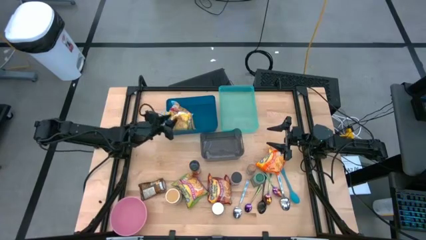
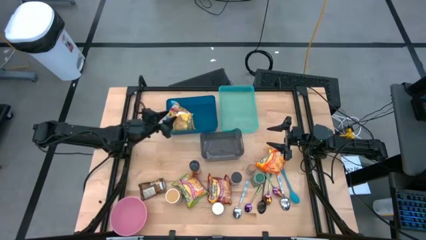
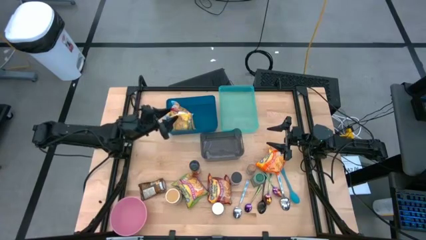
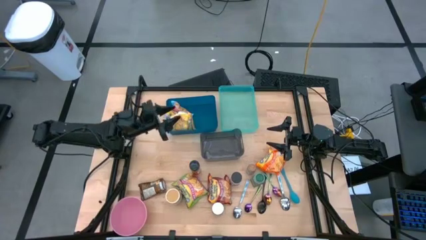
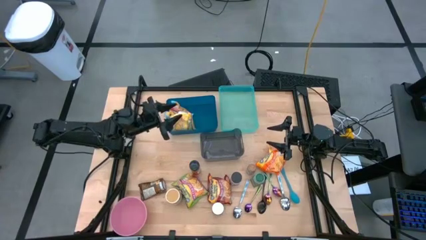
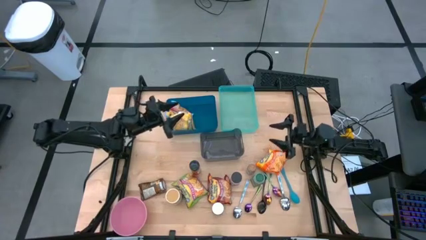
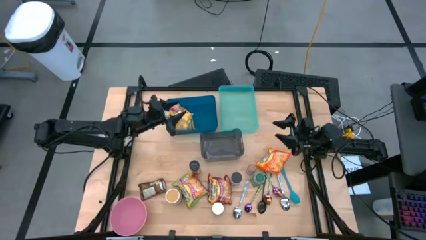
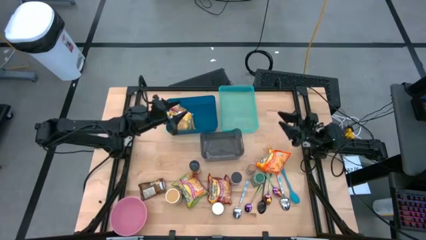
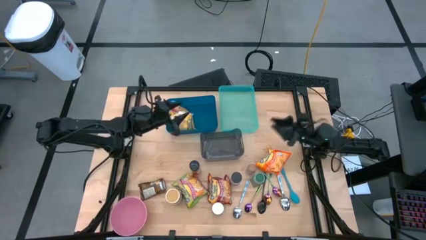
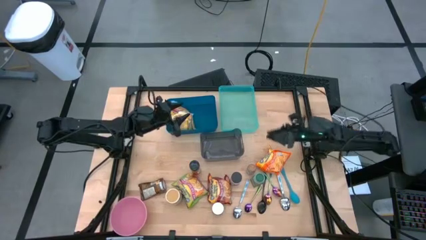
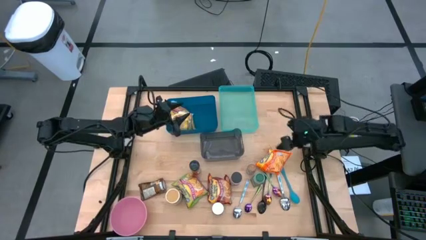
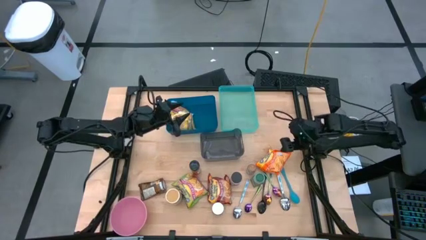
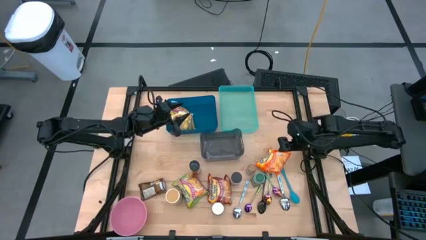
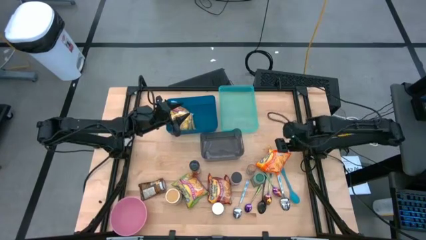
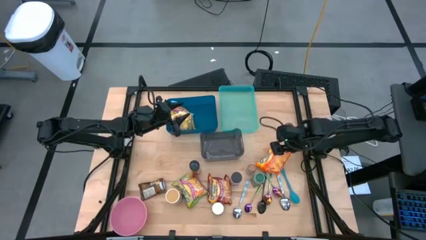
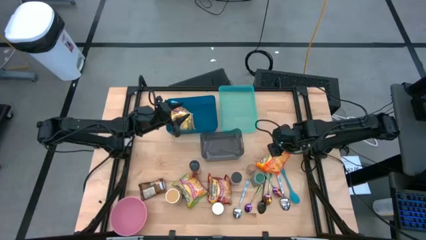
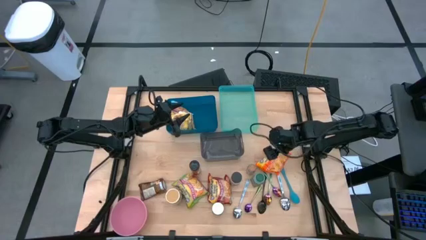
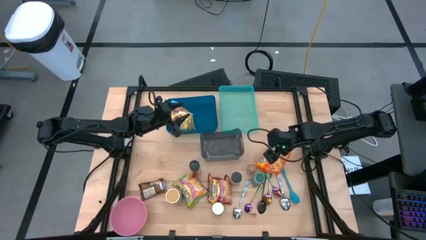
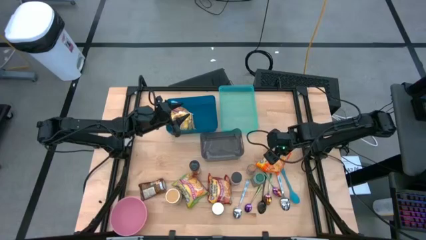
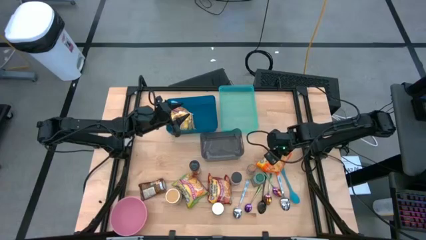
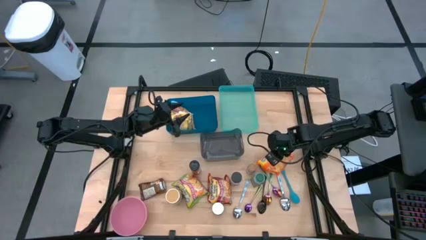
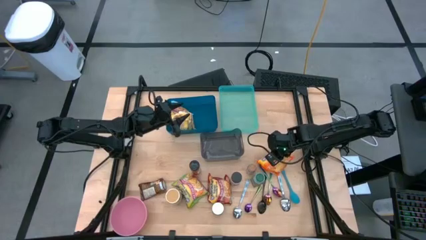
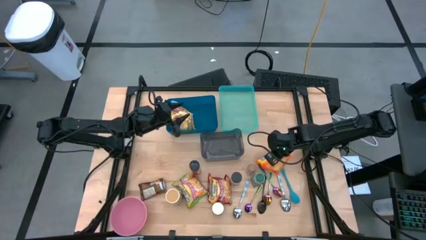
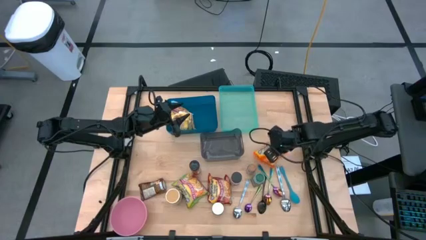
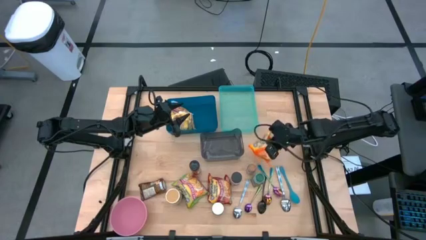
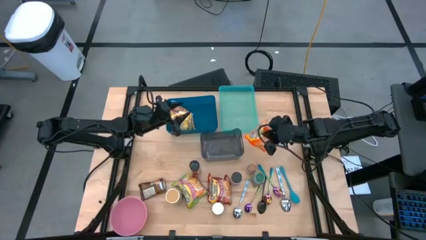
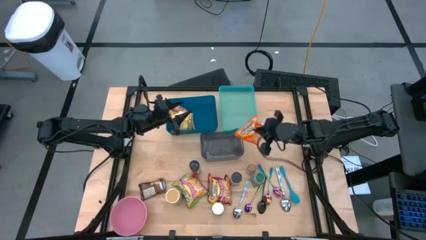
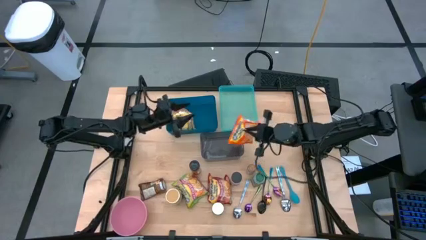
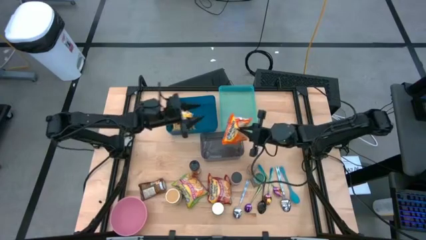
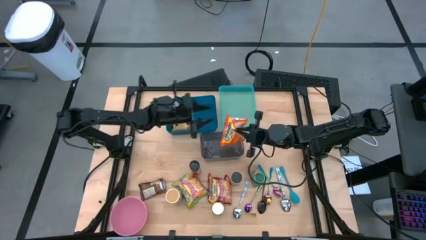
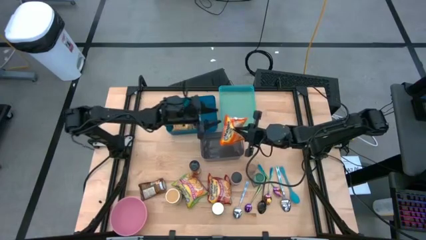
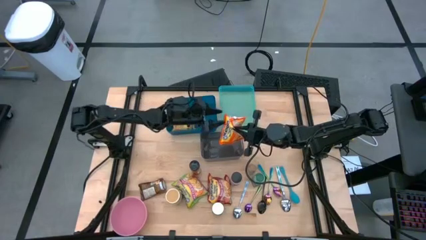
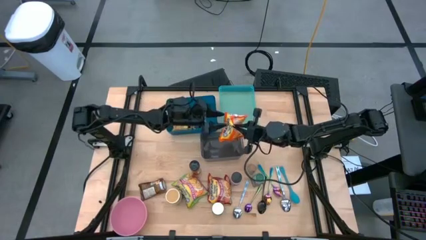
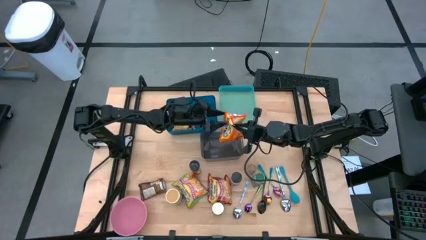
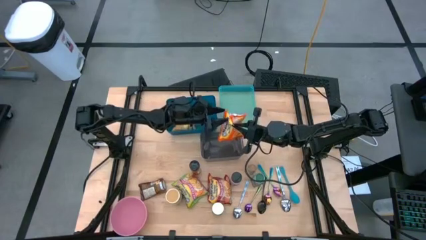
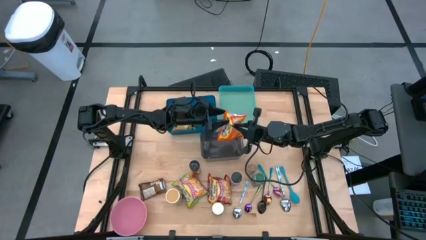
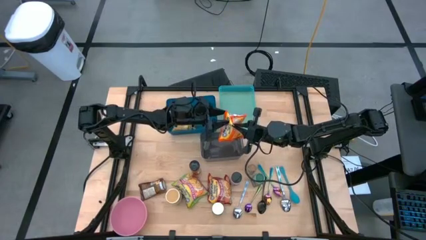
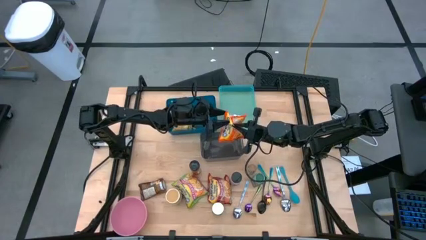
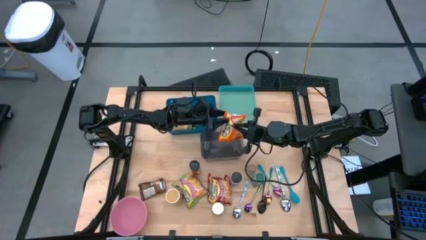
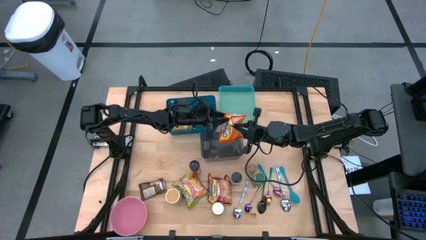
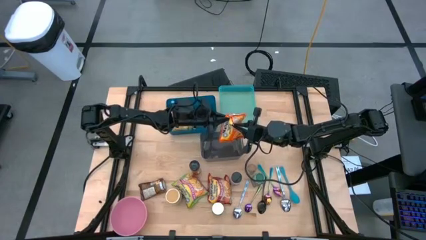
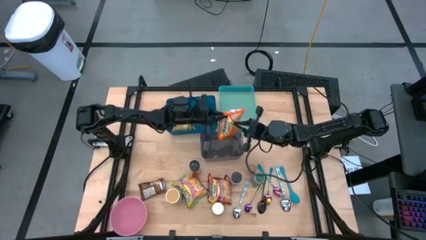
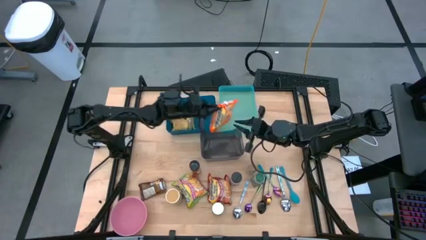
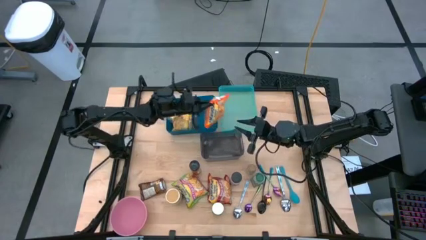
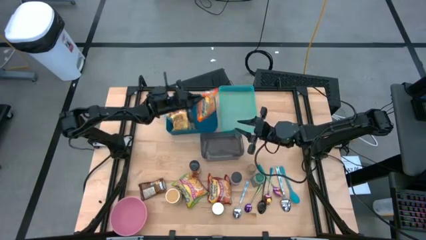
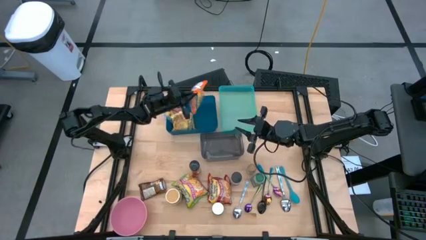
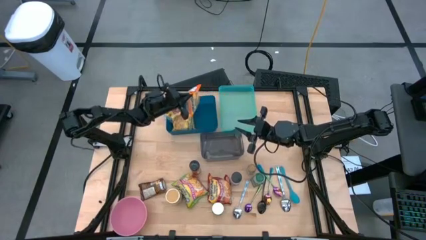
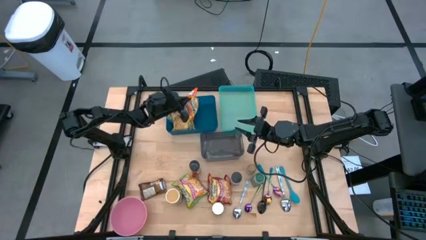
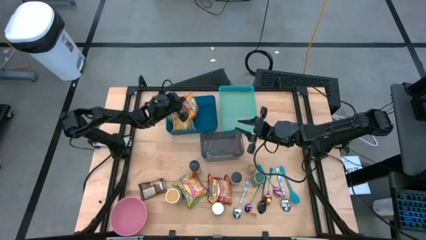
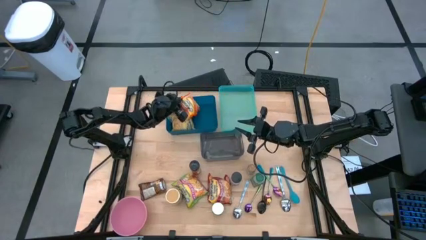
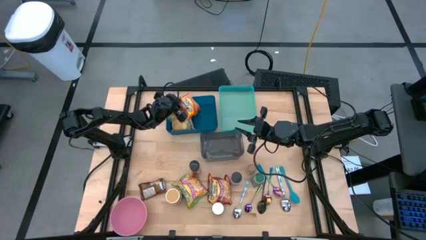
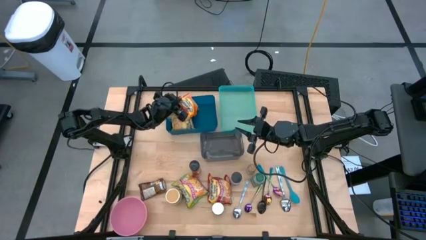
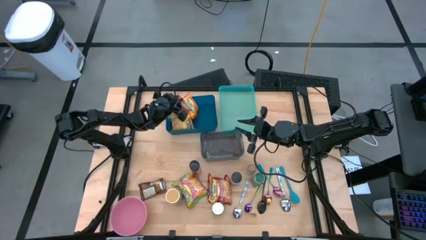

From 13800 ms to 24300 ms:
Task: Pick & Place Food Item
Put the orange noodle pack into the blue bin

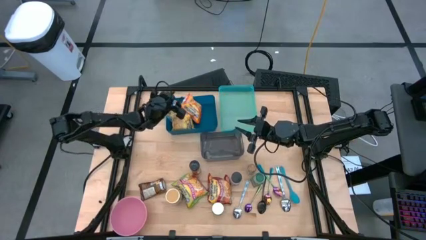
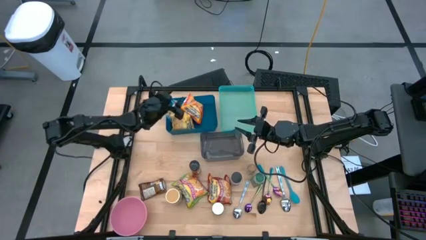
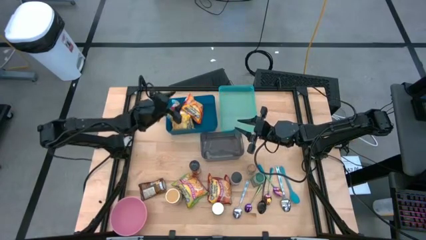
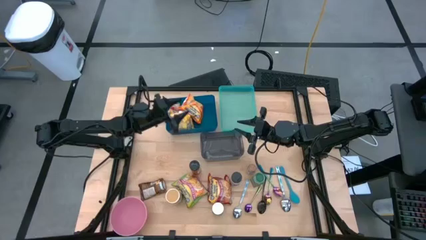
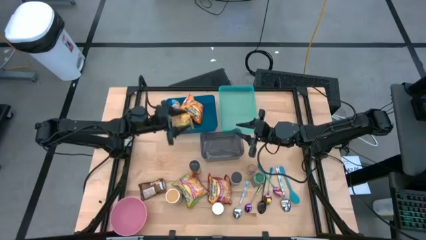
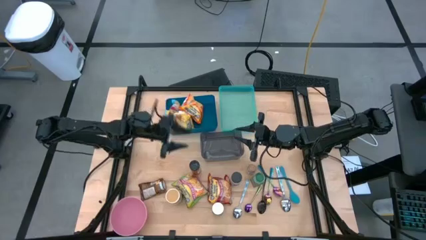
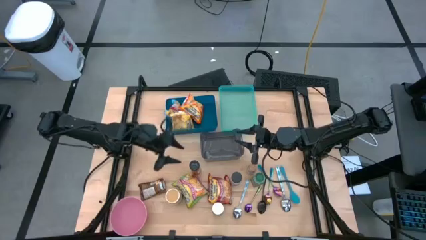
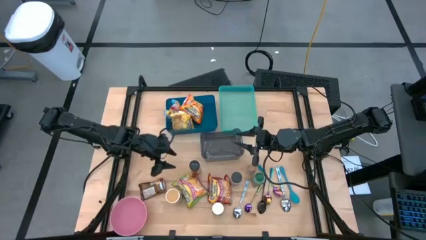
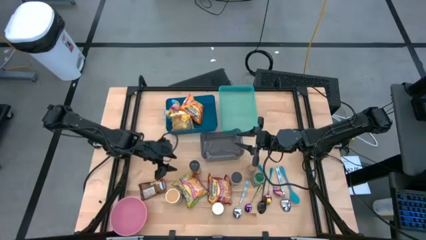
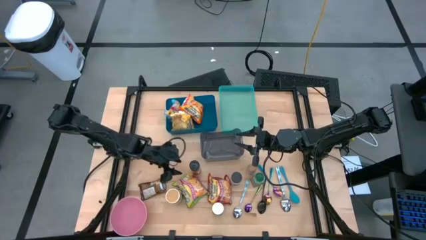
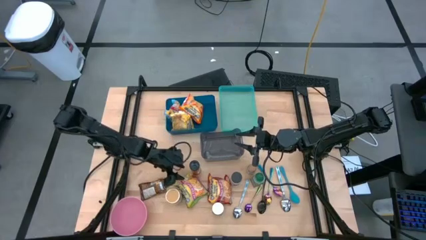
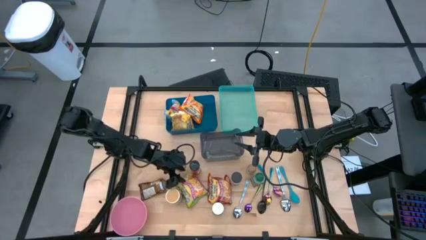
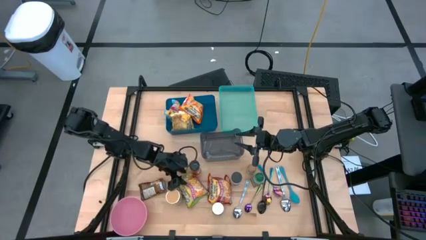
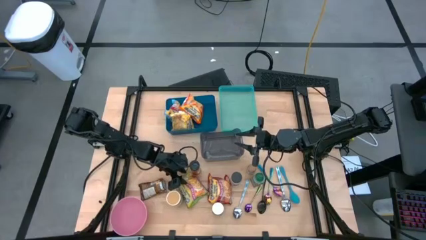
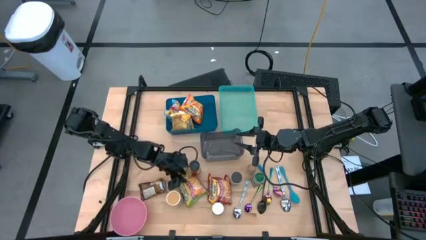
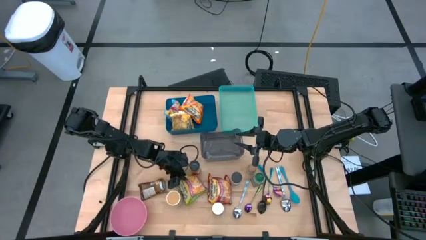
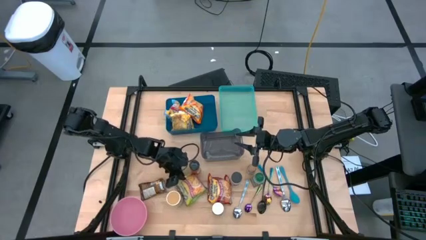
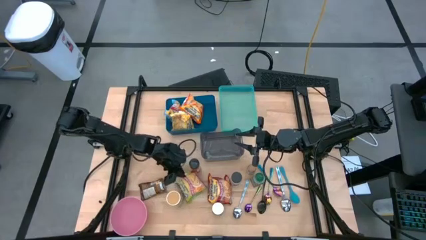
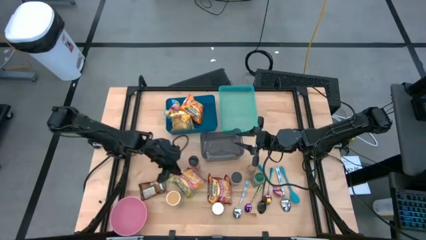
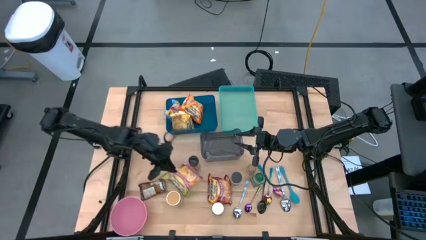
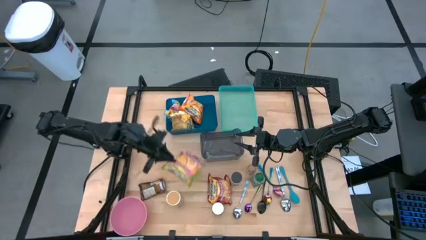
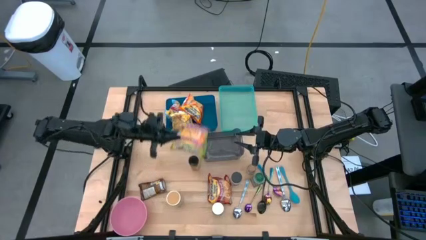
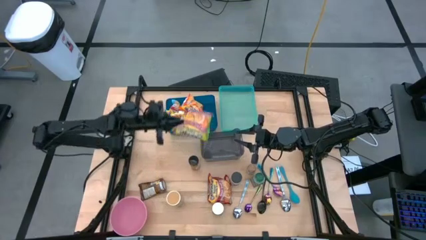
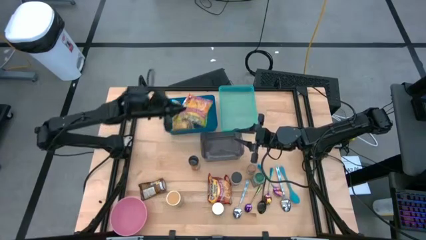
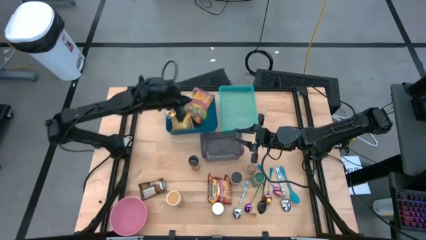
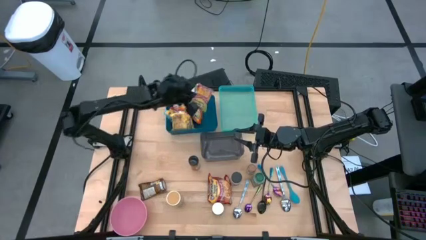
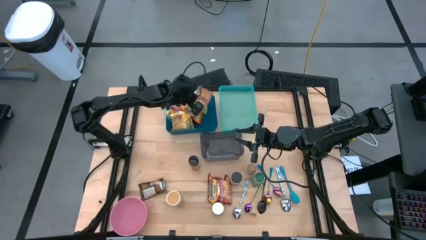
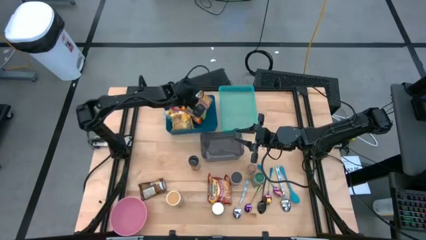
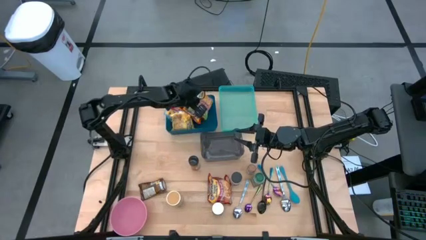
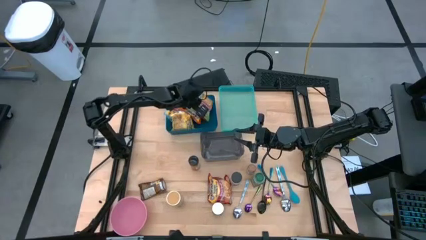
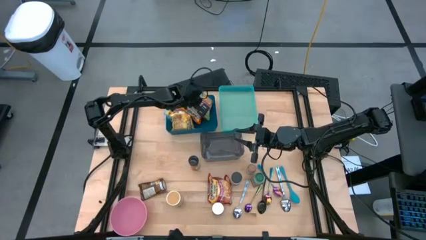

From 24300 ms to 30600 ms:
Put the green noodle pack into the blue bin
